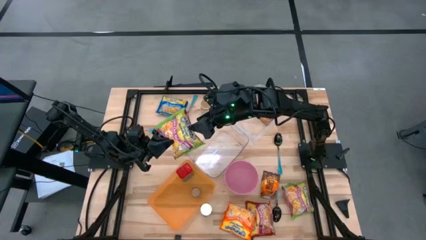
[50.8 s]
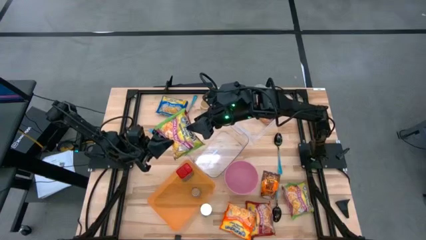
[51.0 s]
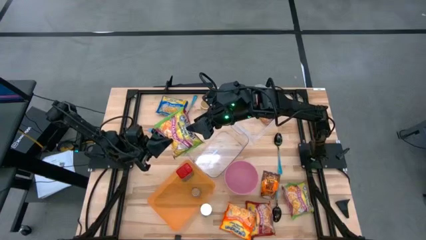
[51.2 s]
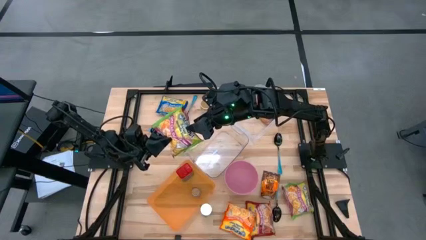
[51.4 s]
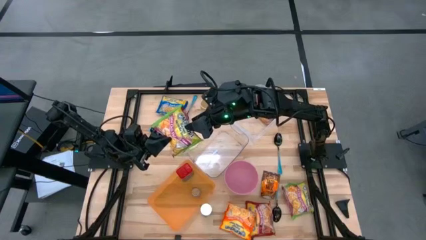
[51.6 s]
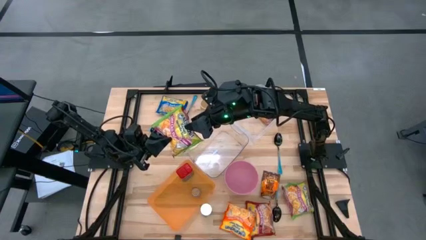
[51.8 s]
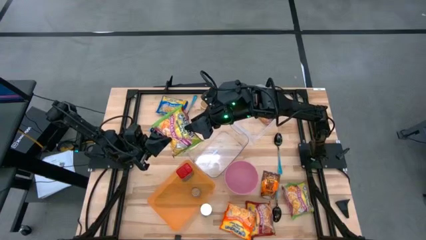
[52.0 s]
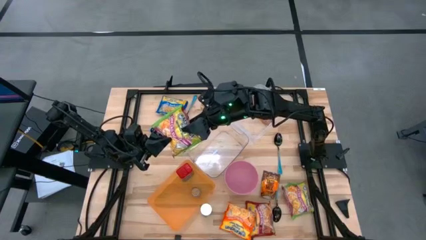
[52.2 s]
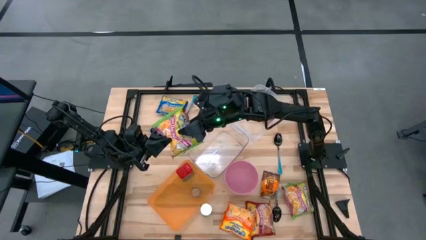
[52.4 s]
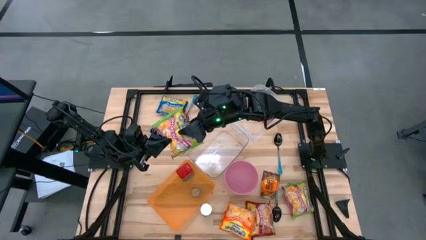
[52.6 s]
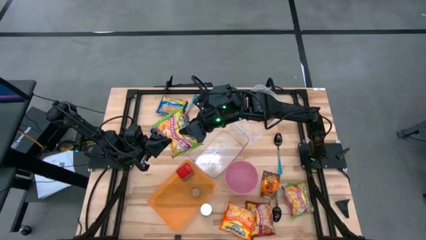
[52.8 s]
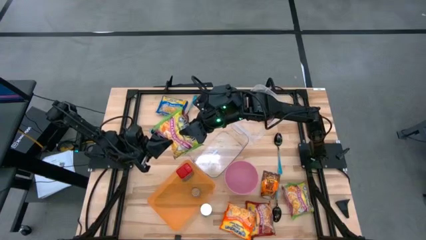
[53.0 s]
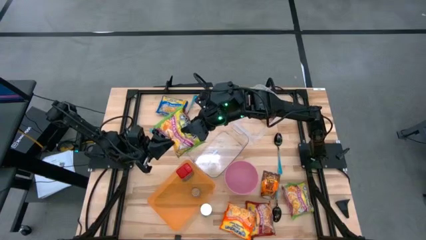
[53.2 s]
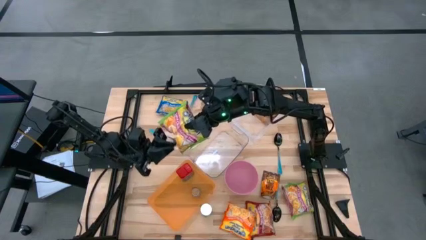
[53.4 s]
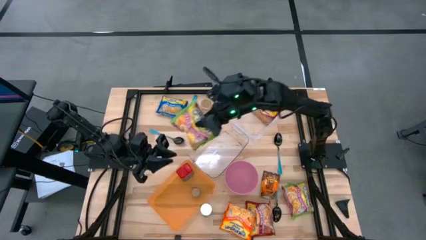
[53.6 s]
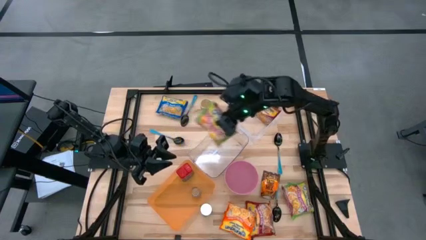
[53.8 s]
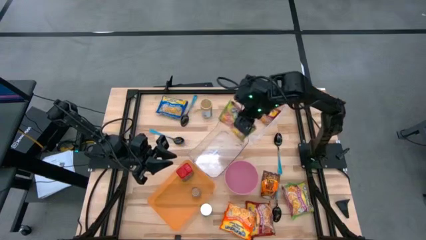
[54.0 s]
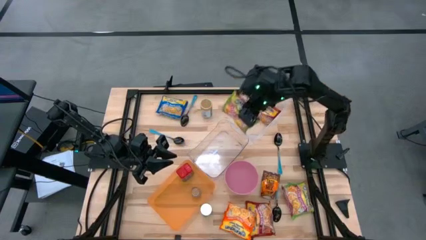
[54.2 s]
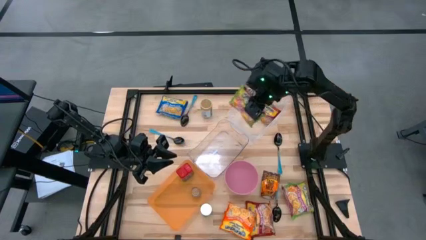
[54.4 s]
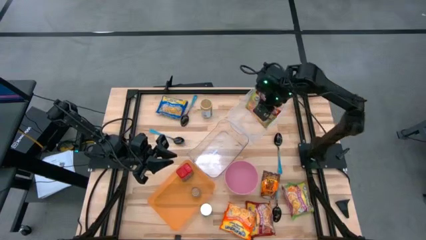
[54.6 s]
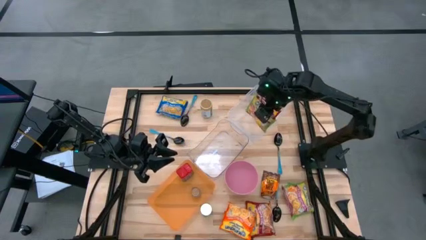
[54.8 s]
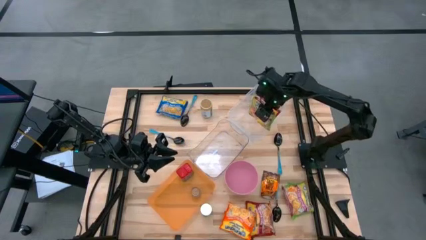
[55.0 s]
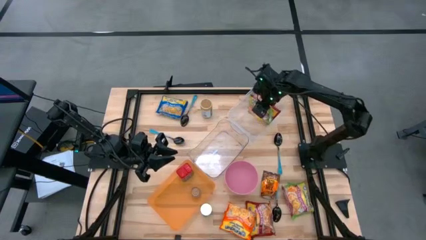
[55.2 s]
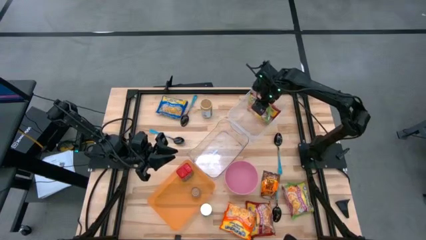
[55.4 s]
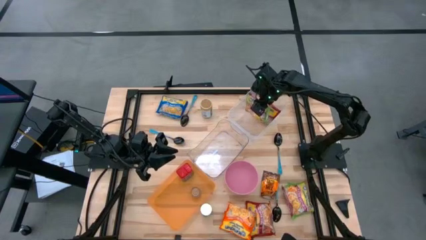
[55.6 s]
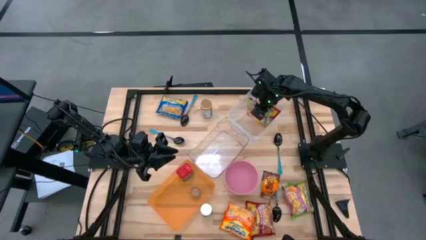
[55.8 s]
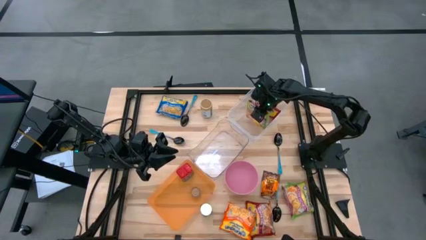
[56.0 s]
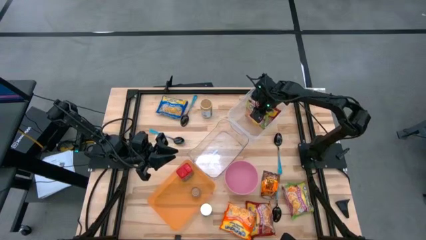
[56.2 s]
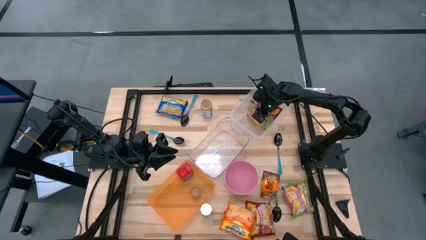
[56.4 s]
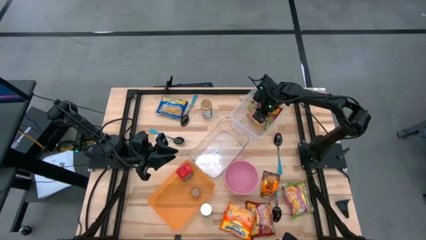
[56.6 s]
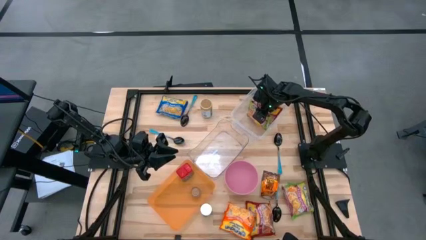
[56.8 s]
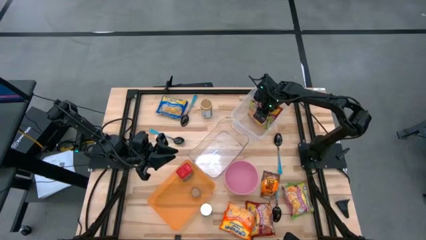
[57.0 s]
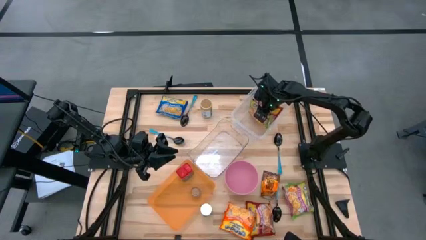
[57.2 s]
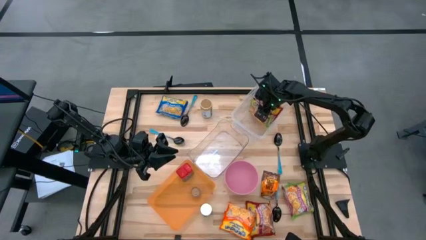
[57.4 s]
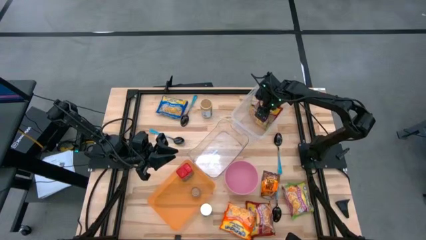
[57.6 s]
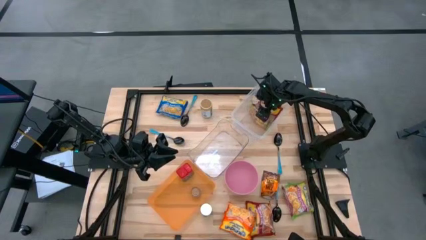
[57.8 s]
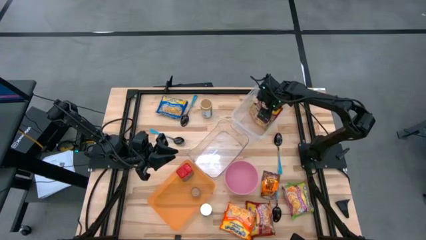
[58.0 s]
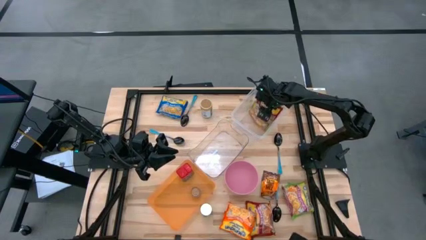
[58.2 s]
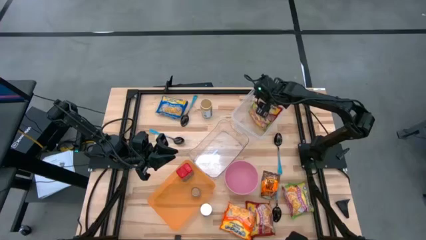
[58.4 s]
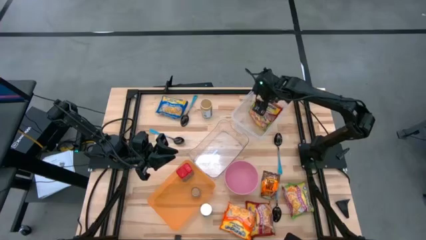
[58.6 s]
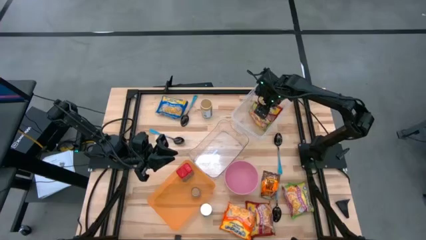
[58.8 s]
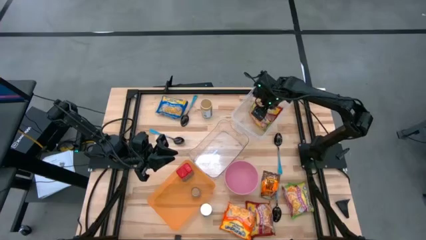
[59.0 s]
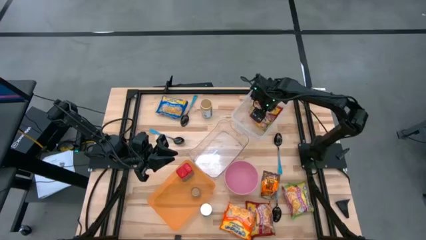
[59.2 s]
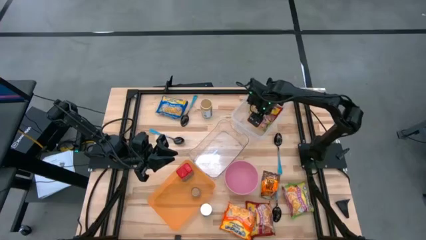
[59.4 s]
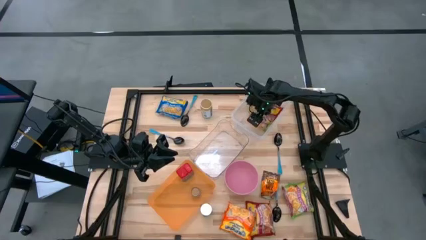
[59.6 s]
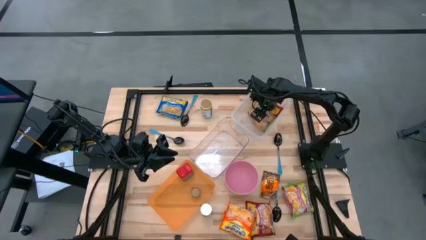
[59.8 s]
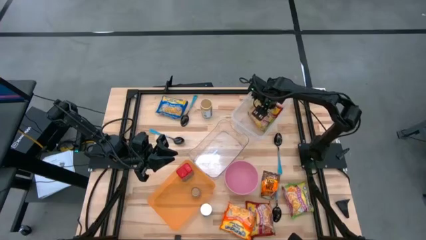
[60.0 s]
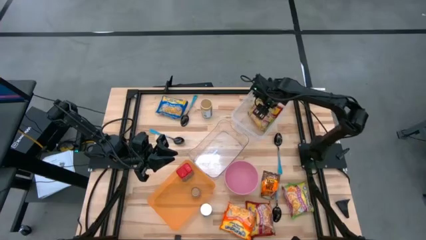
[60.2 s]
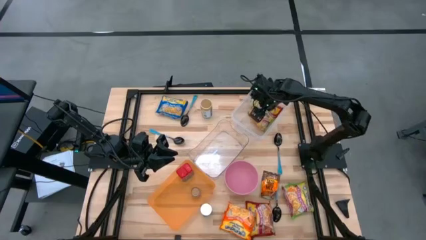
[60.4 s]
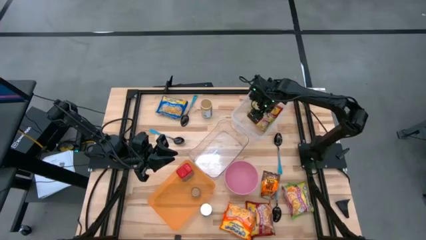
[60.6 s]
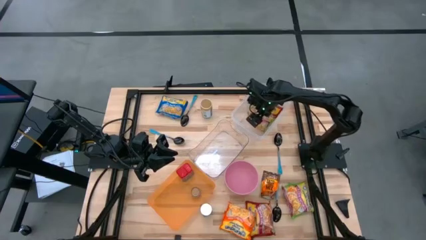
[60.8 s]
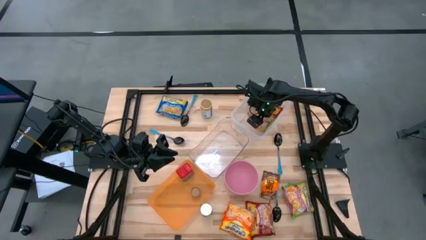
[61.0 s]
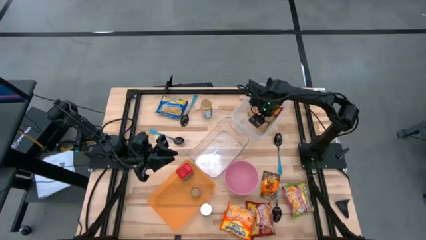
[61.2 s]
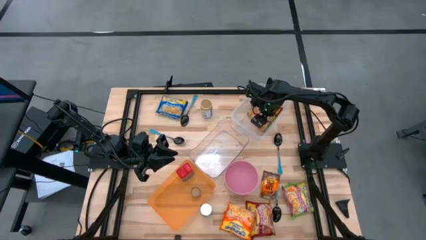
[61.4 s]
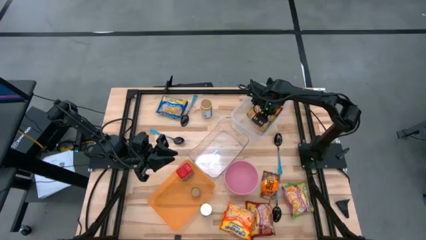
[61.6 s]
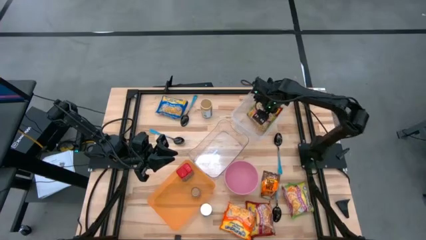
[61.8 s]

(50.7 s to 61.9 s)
Task: Pick & Place Food Item
Put the green noodle pack into the transparent container
